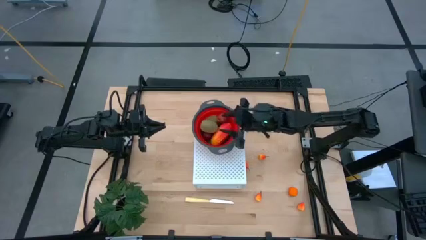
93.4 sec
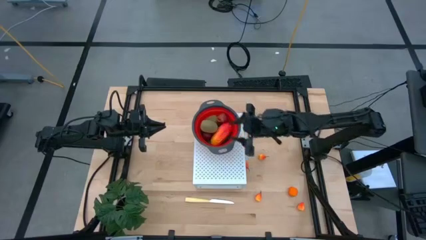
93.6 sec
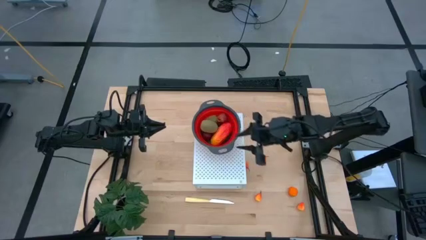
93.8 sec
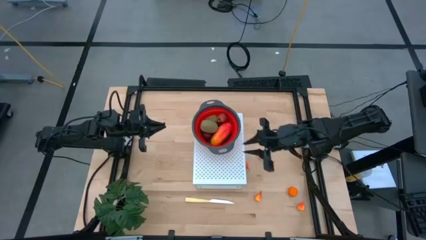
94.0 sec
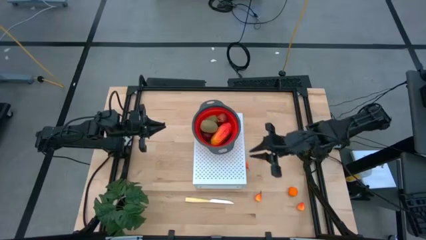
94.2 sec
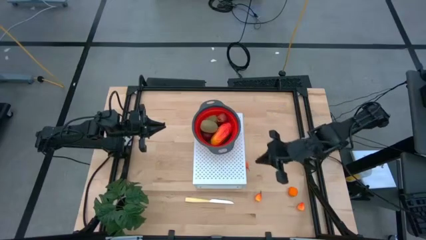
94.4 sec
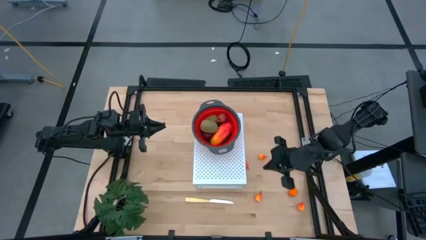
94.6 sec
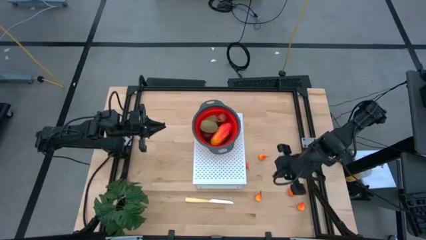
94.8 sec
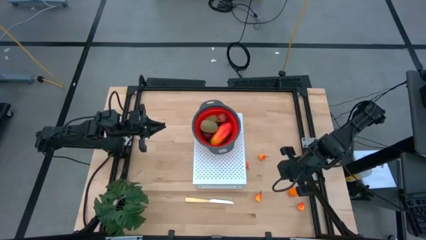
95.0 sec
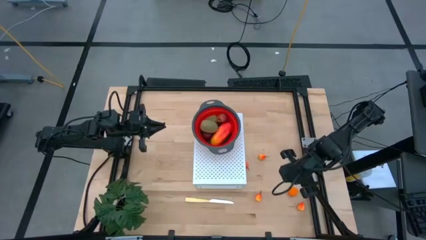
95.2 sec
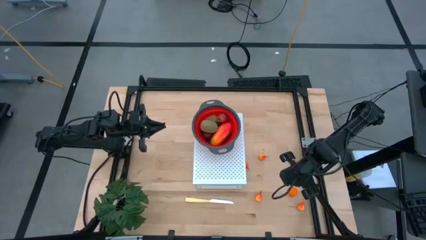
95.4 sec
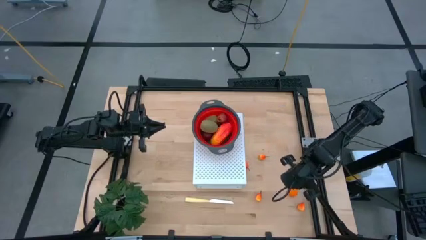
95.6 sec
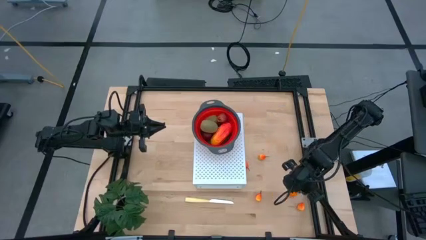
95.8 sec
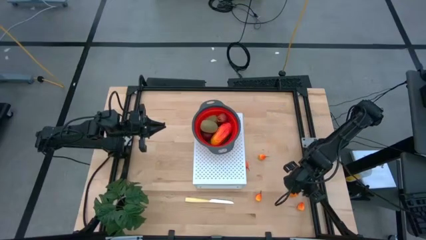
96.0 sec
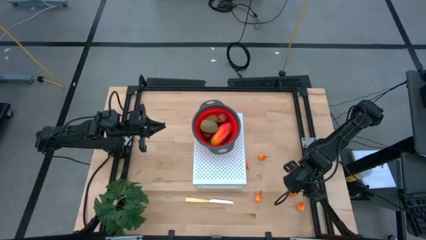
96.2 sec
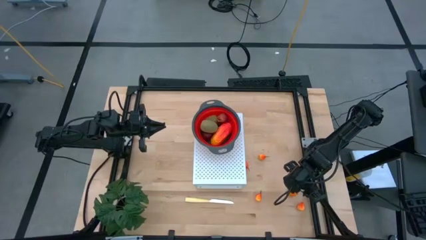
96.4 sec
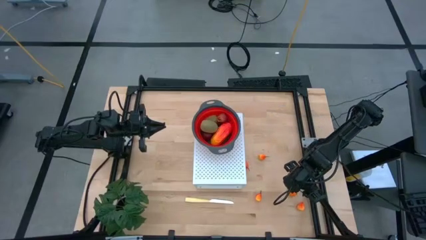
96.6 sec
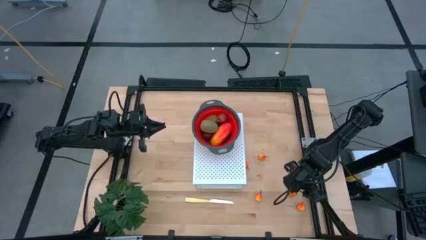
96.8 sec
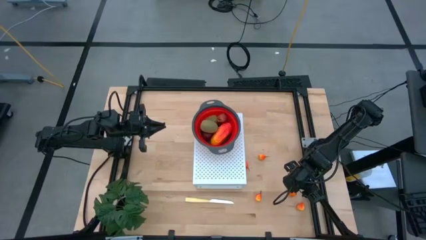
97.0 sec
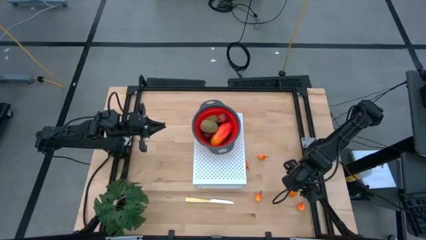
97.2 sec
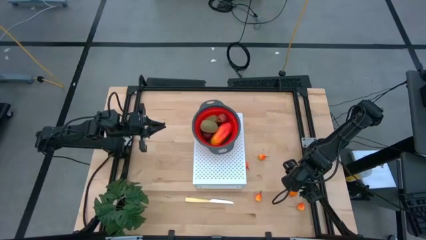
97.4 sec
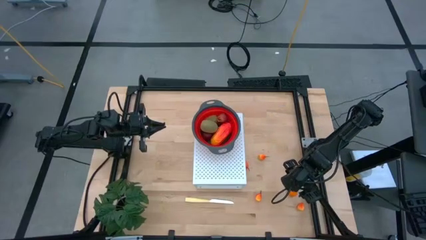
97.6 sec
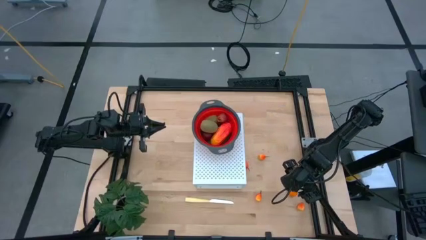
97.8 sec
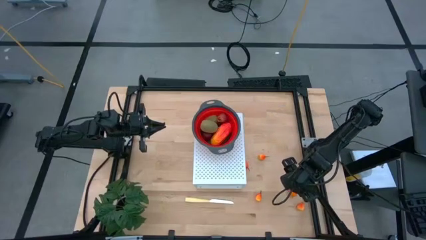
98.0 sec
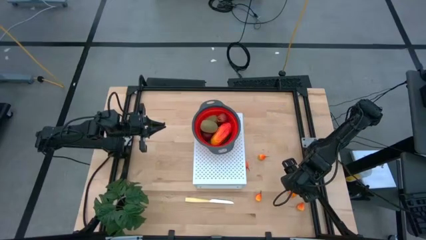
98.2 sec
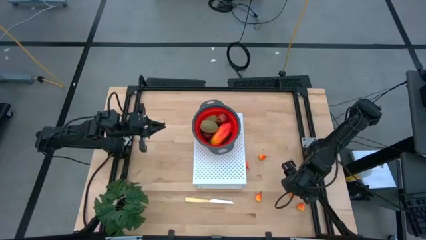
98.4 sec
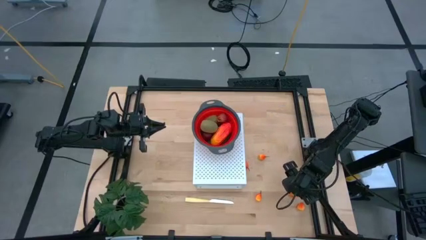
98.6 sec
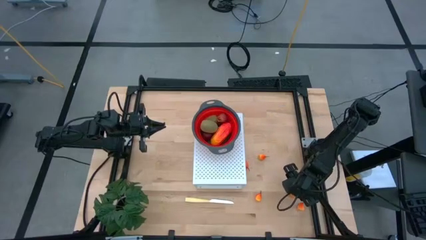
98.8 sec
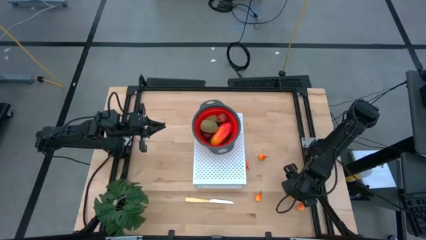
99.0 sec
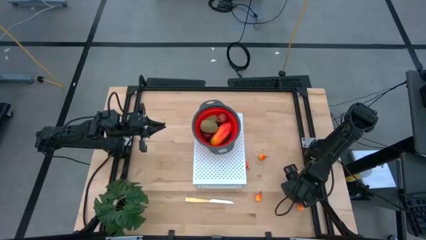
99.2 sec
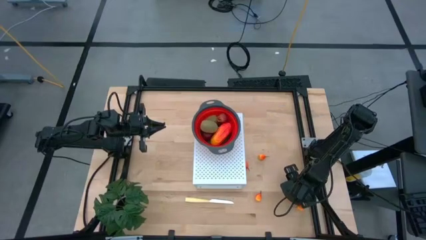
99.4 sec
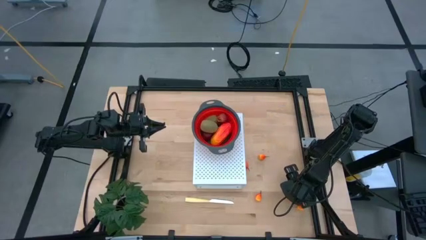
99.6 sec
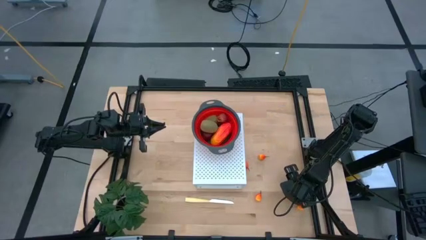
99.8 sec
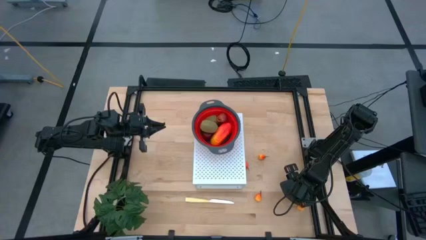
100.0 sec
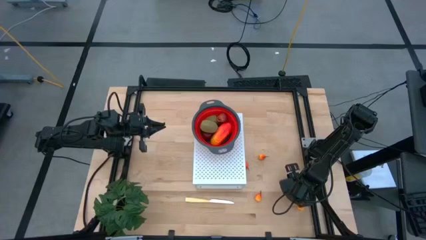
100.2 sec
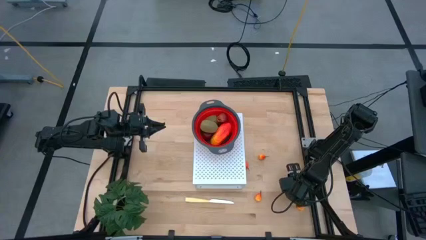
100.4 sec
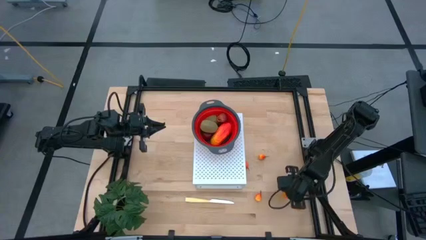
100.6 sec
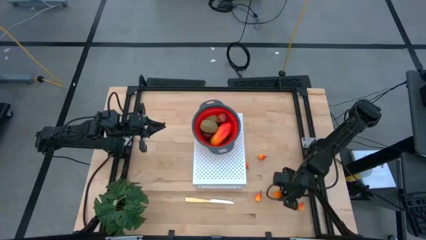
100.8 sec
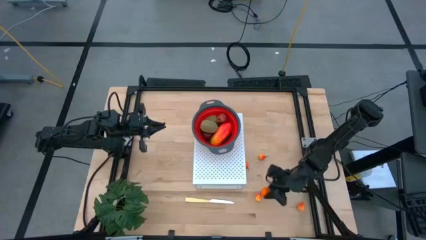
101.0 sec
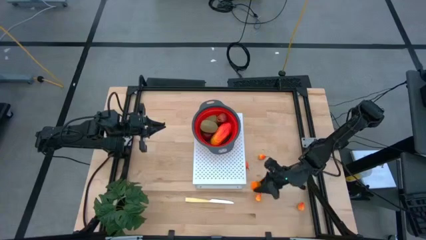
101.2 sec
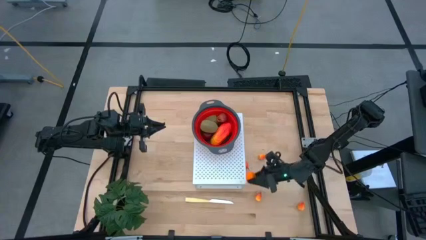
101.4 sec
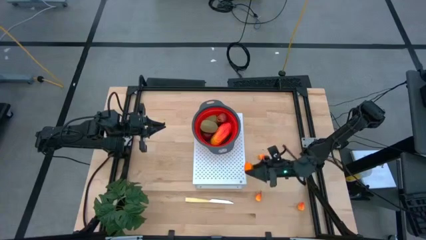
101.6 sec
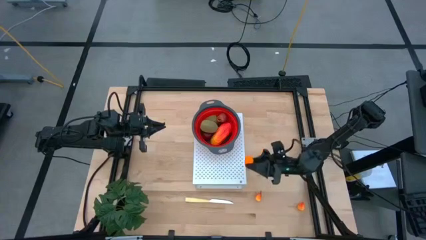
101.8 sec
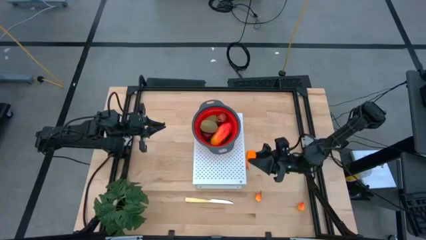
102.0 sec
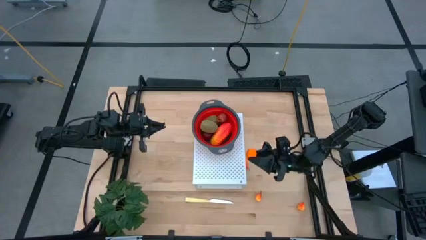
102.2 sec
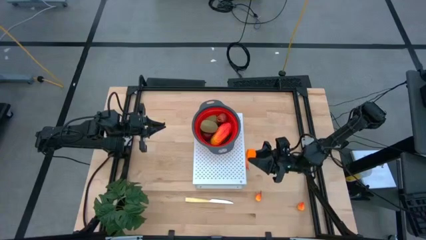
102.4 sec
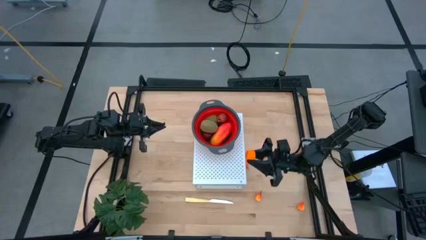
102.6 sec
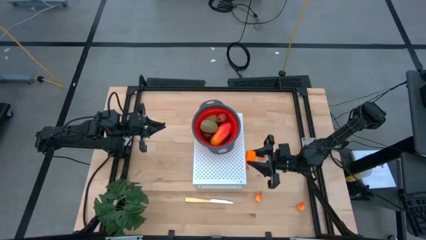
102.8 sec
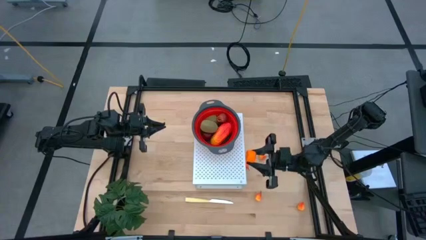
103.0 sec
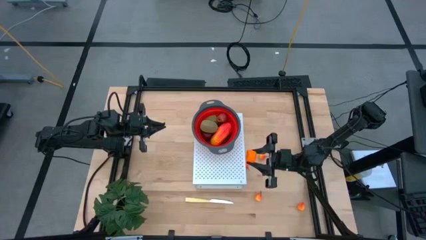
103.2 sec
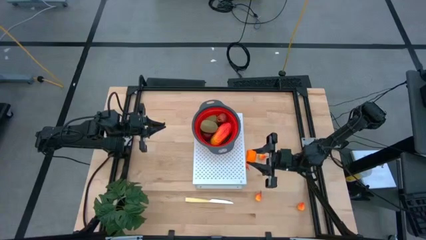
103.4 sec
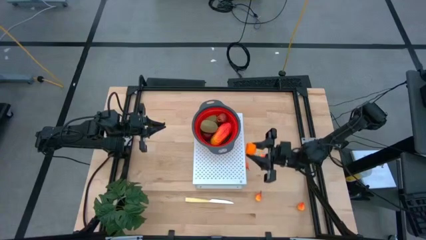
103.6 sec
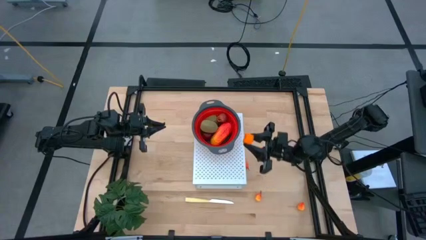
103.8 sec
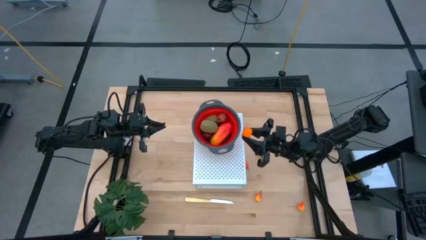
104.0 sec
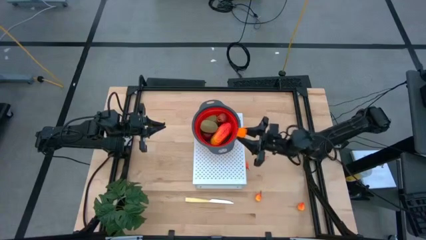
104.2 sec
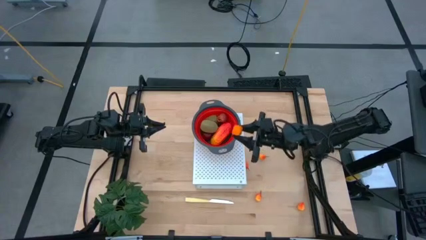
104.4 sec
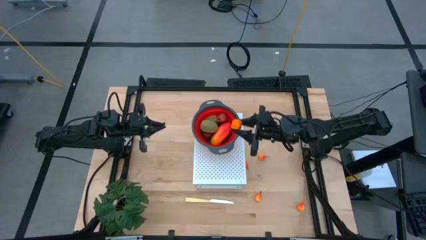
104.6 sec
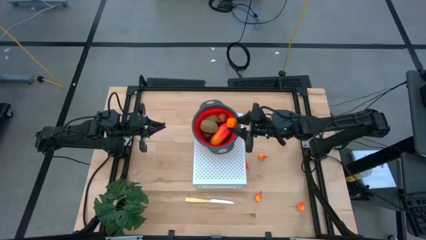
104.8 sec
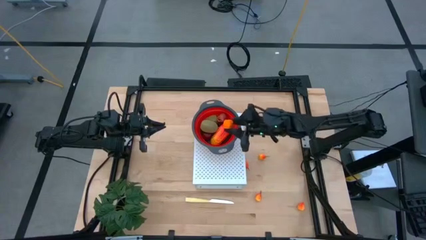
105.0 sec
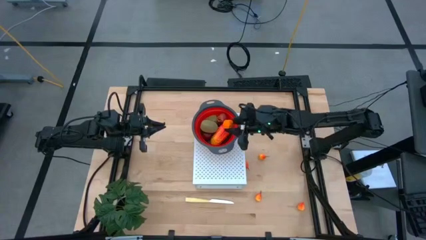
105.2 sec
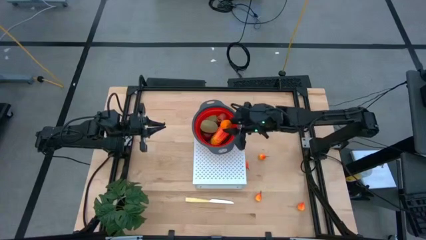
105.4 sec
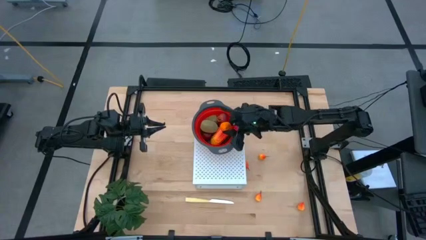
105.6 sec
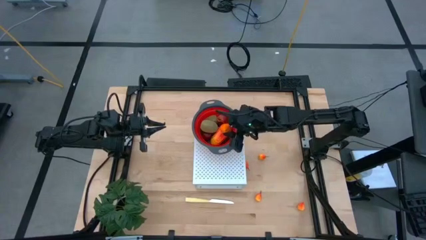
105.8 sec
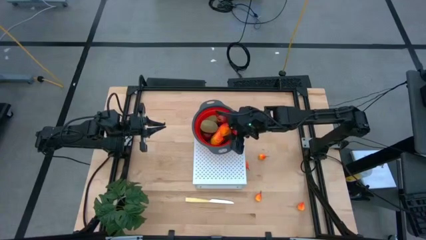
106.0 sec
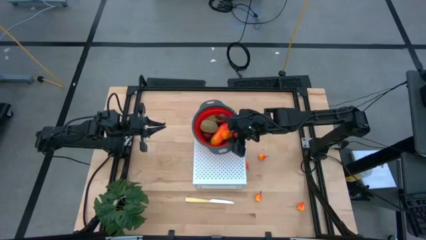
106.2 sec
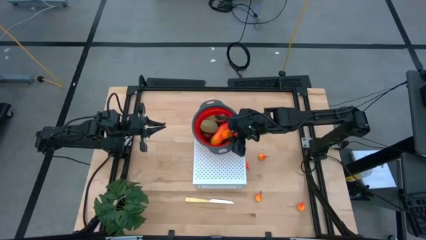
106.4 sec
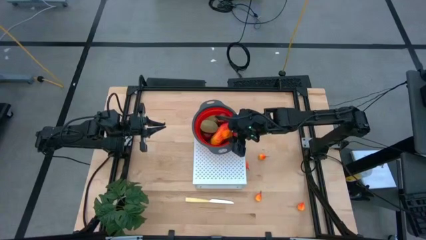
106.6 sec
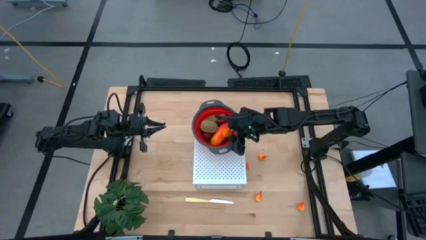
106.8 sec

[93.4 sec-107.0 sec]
Task: Pick & Place Fruit
Put the tangerine into the red strainer bowl on the shelf

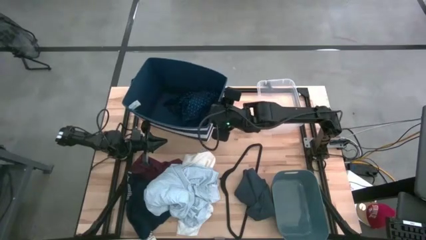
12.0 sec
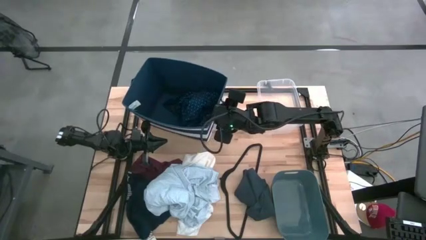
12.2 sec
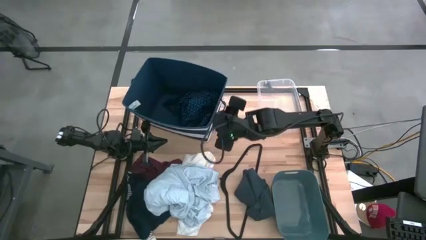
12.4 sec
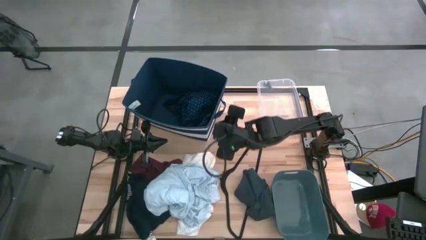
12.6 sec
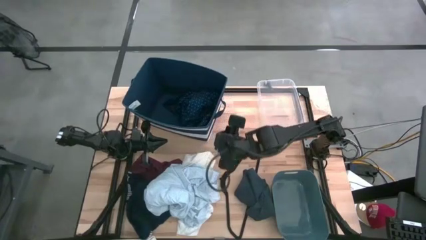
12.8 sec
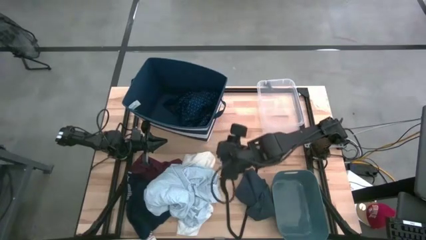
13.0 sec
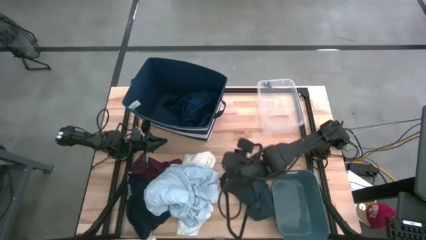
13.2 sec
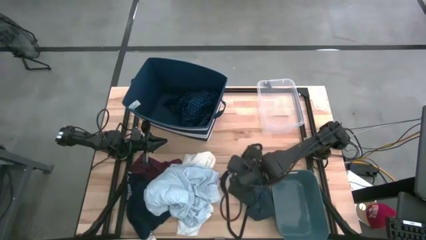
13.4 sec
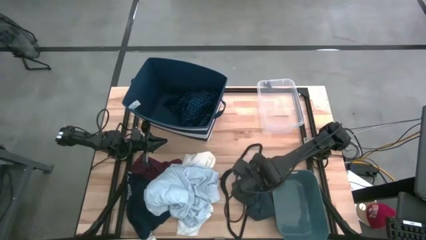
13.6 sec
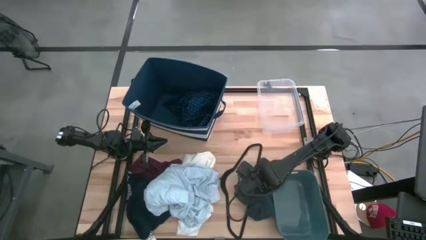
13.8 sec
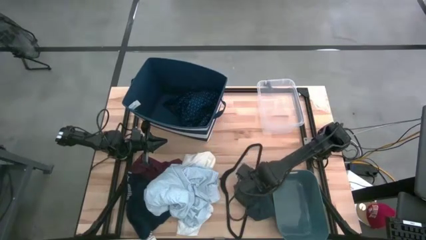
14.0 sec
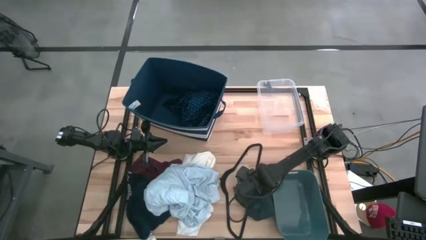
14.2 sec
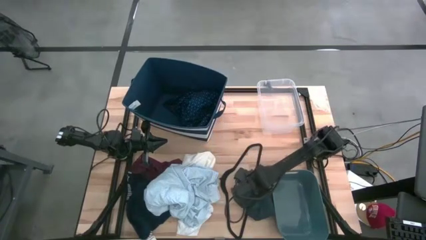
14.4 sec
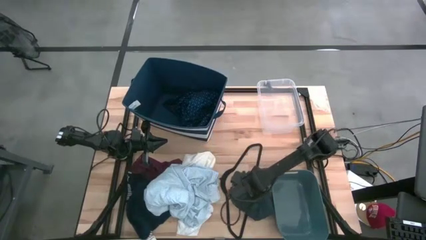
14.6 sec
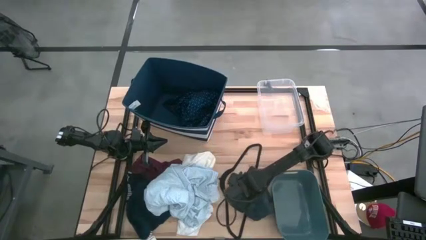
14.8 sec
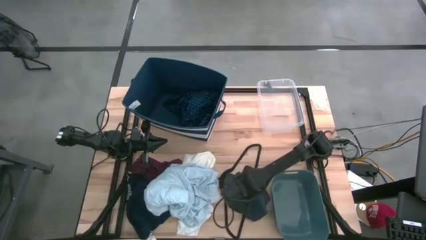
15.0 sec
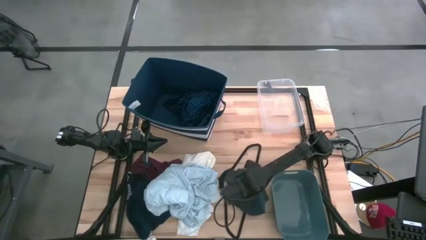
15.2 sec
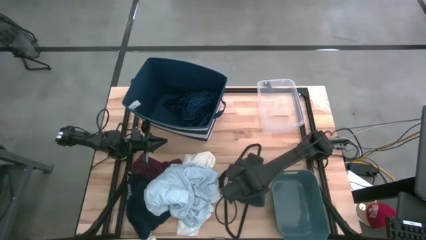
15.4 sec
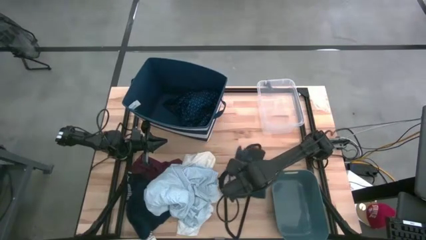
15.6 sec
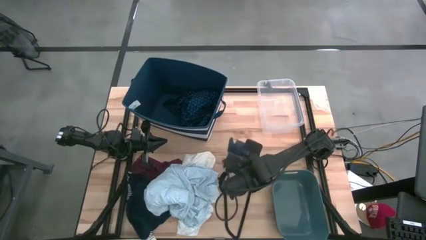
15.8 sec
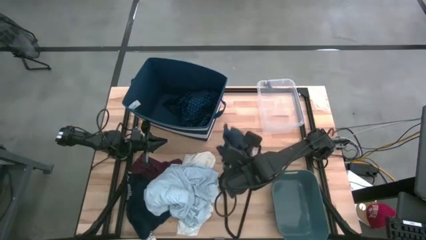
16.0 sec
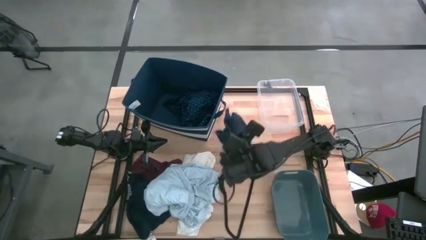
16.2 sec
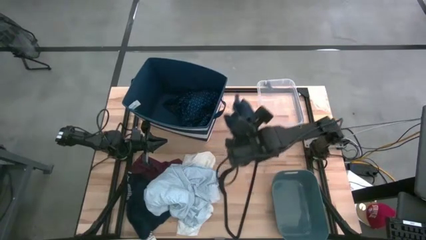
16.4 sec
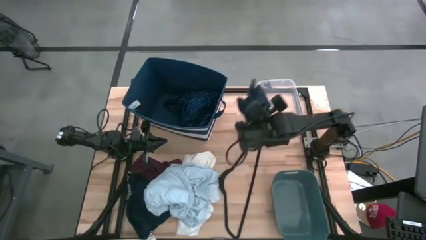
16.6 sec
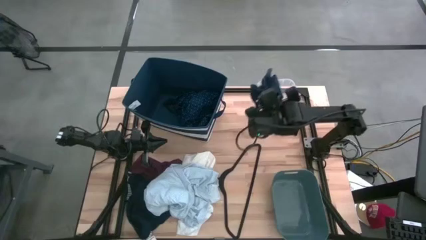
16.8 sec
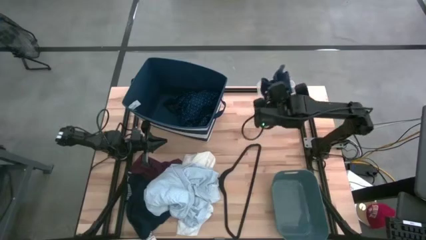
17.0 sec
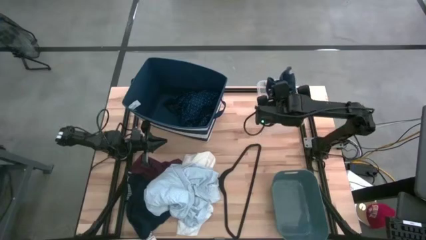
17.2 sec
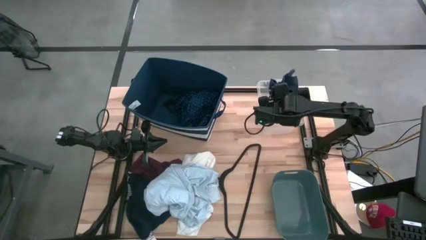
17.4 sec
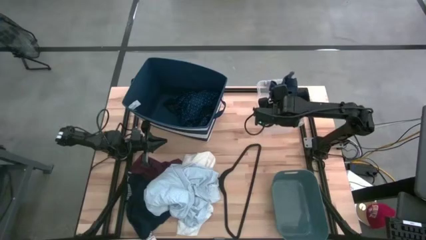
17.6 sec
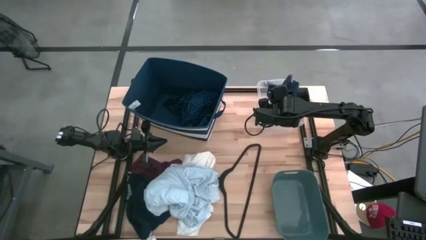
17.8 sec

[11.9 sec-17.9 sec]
Task: Pick & Place Cloths
Put the right black boxer into the transparent bin
